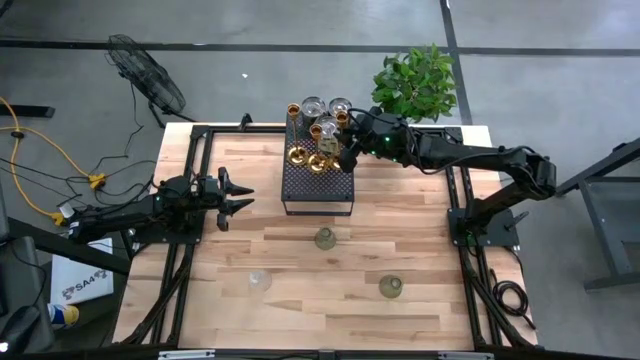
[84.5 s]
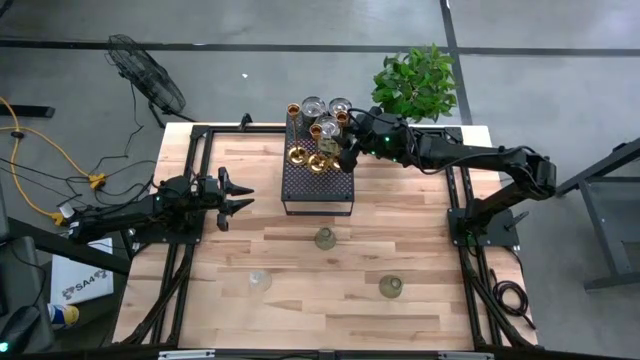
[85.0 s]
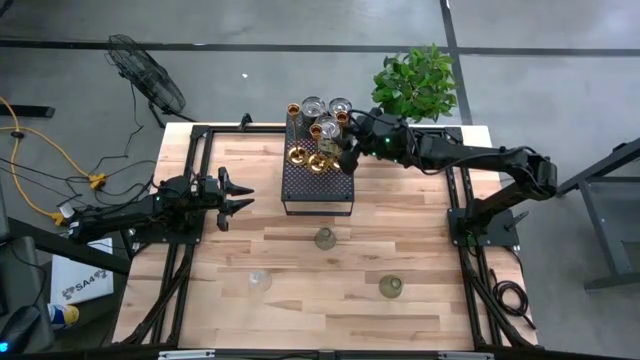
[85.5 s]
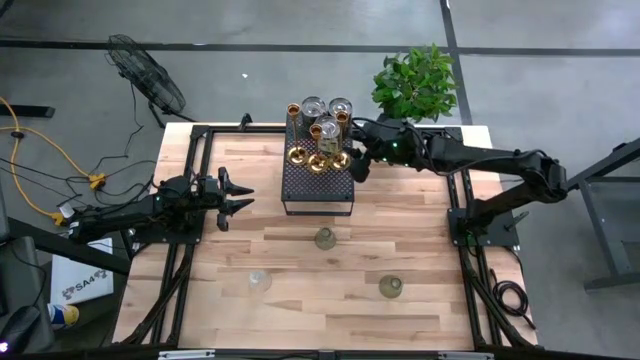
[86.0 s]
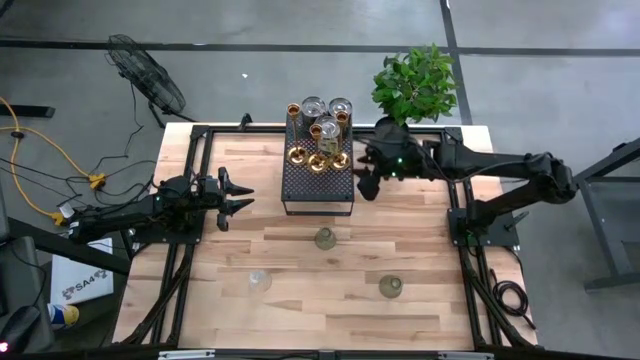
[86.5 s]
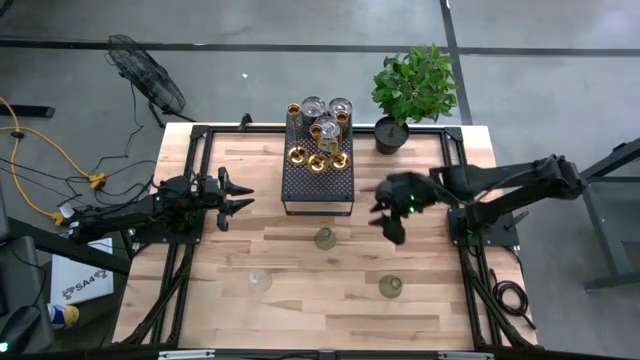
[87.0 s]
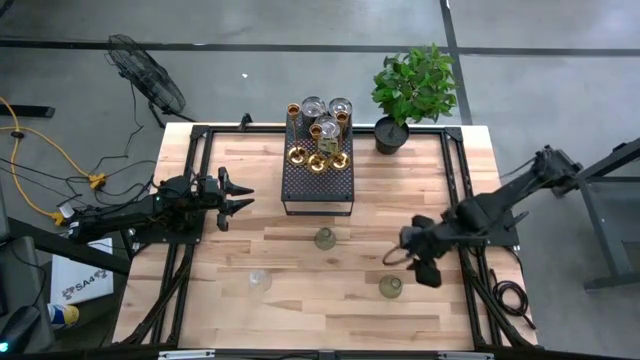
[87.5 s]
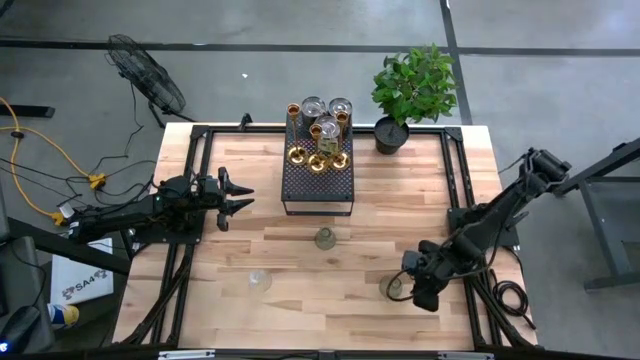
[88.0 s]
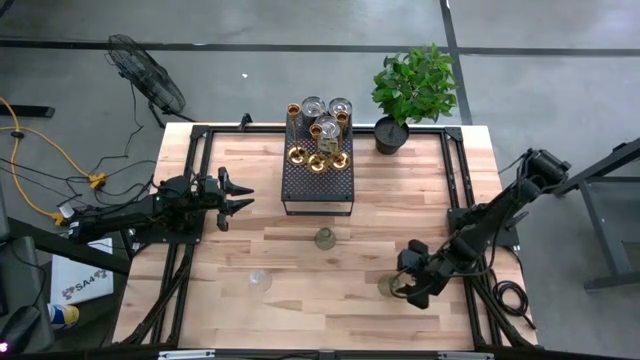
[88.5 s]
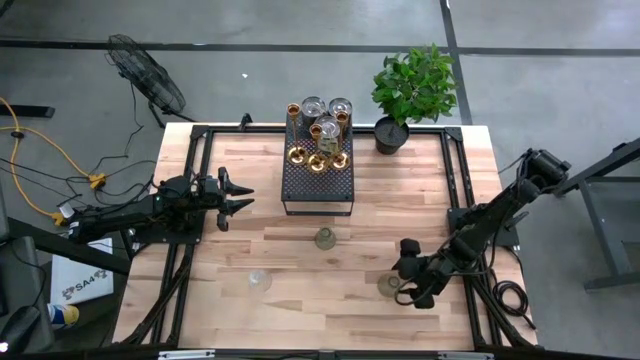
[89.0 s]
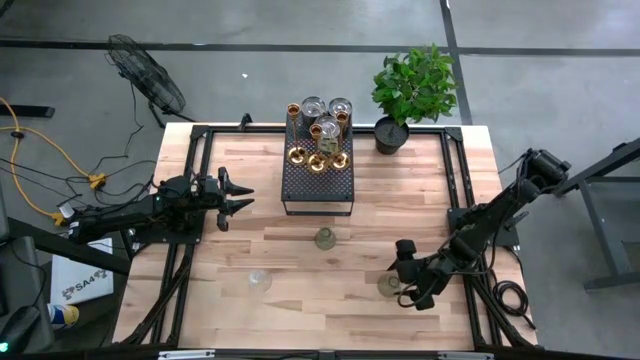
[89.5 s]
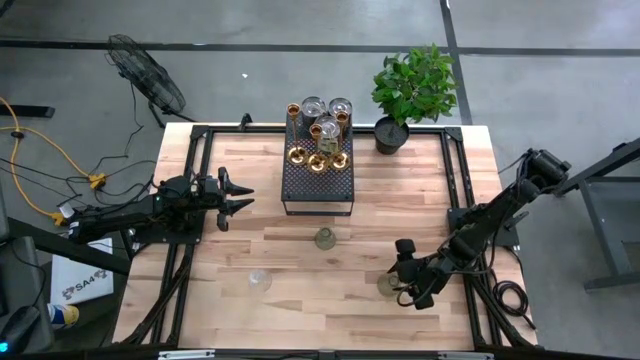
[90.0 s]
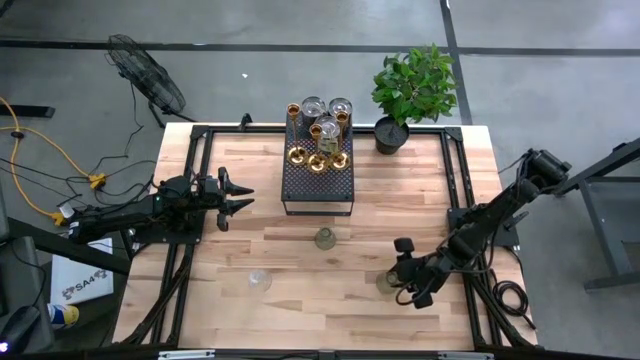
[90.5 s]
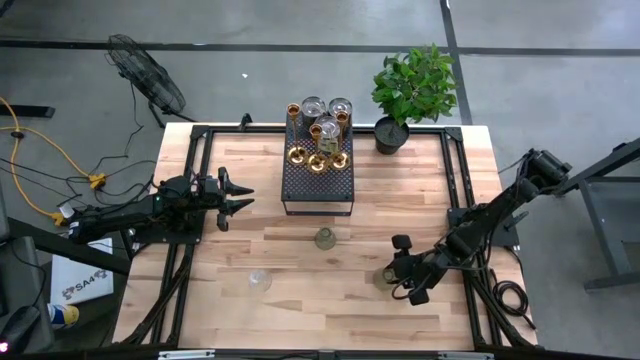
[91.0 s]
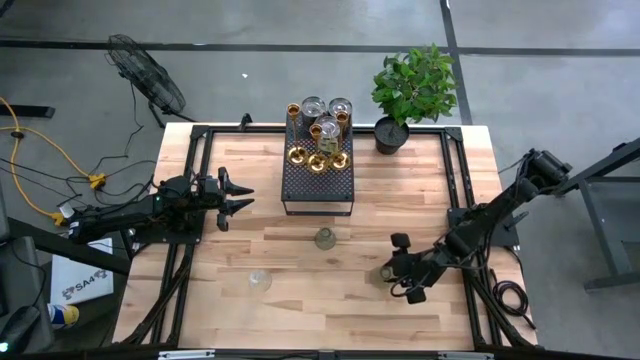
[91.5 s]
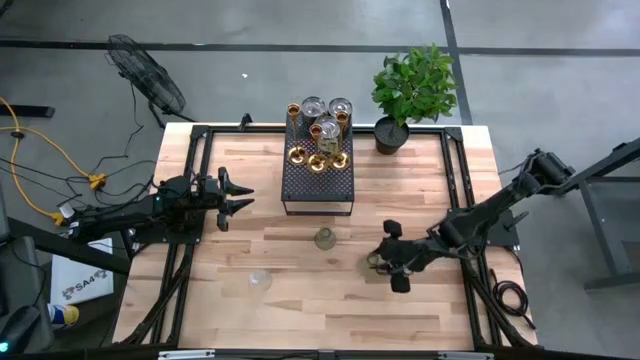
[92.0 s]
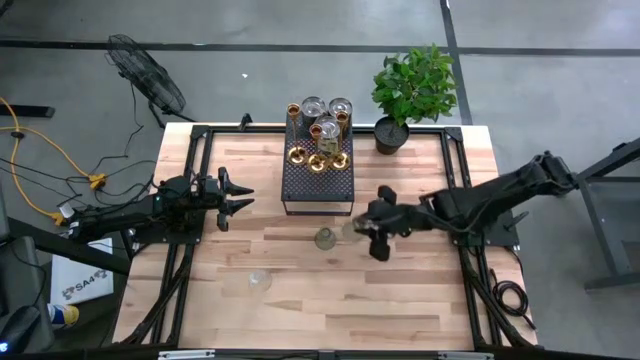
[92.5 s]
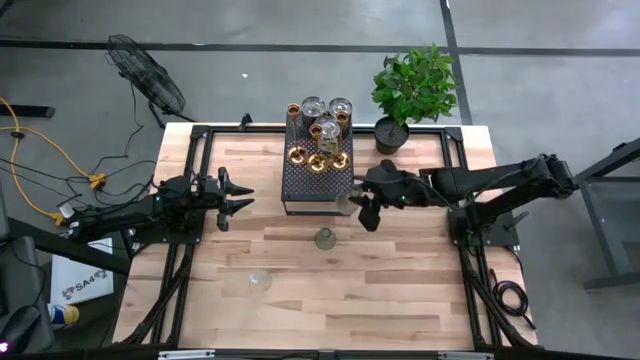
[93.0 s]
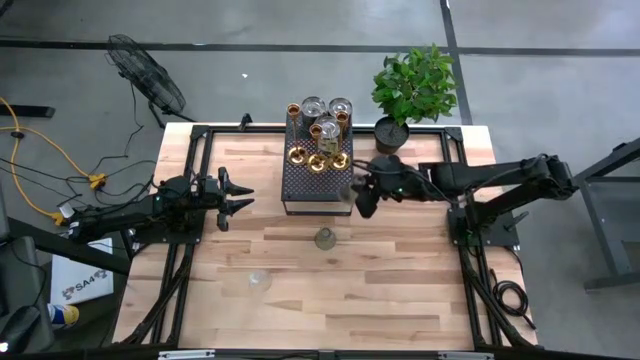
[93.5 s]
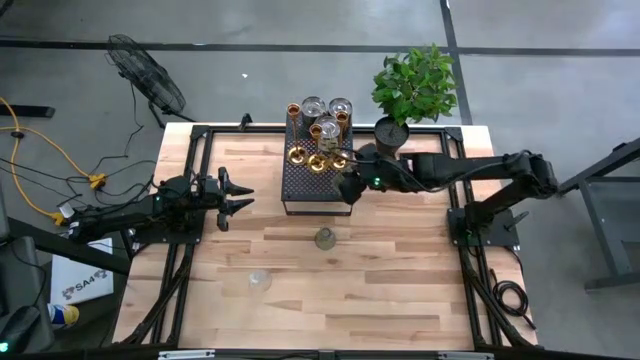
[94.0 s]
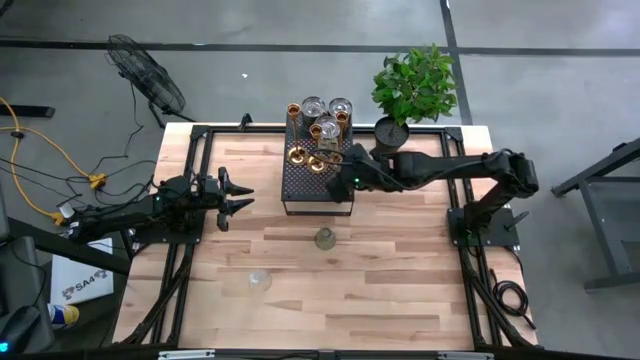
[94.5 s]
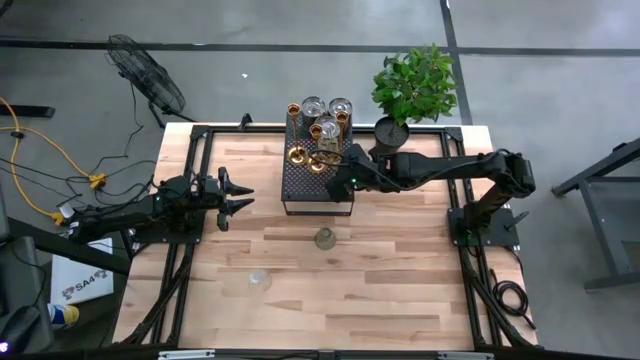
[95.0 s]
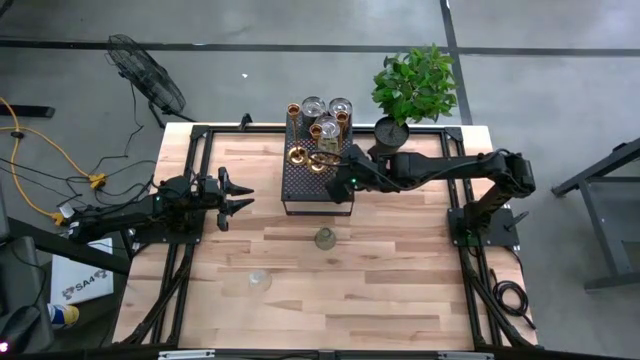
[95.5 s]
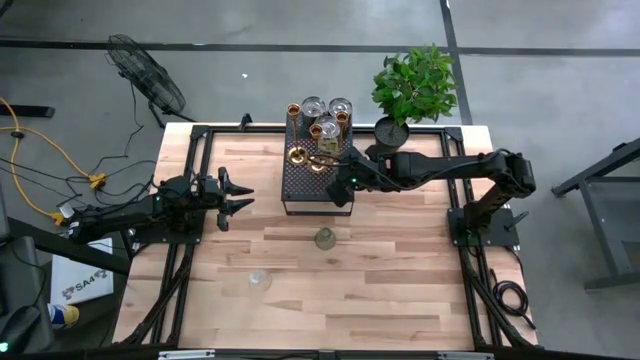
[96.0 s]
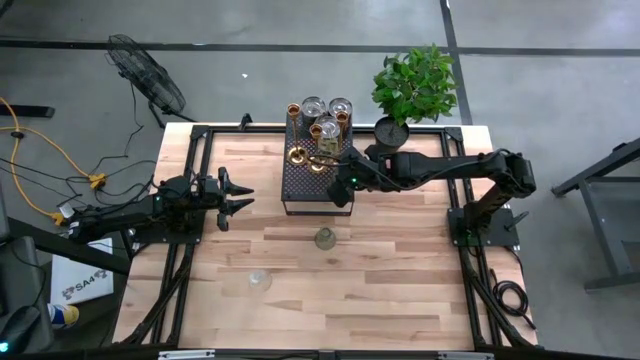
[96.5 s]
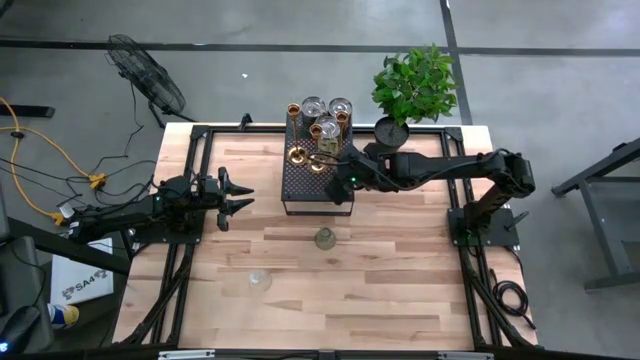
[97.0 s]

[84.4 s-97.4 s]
Task: Pick & Place candle stick holders
Put the bottom-right green transparent candle holder on the shelf

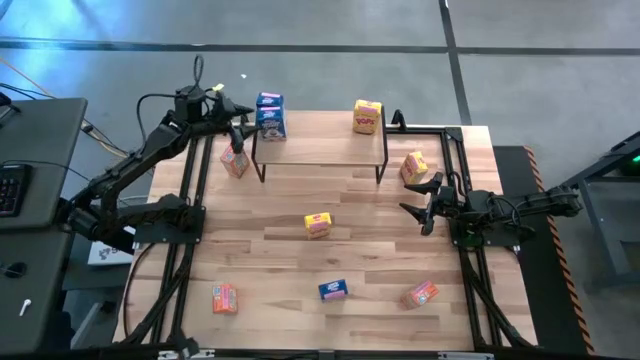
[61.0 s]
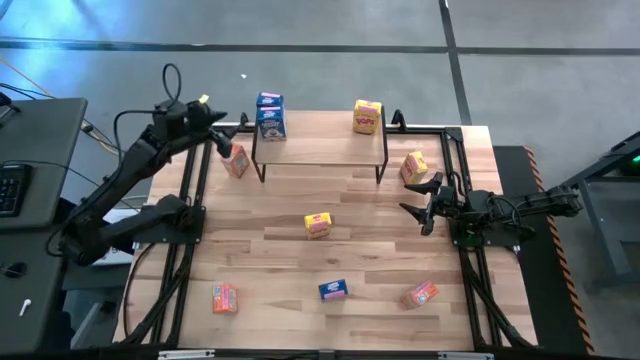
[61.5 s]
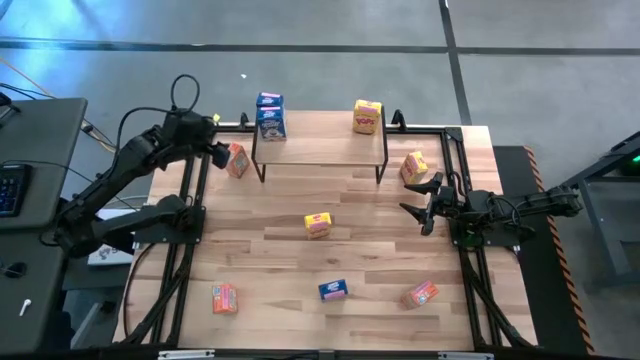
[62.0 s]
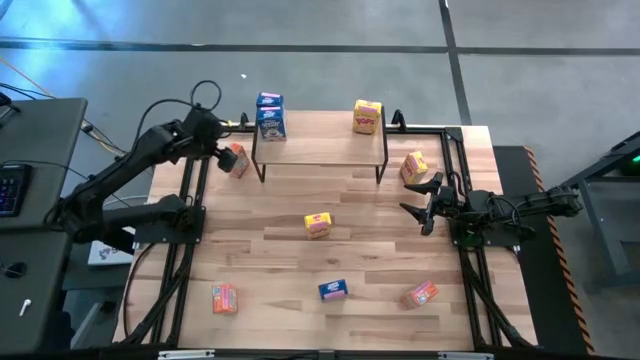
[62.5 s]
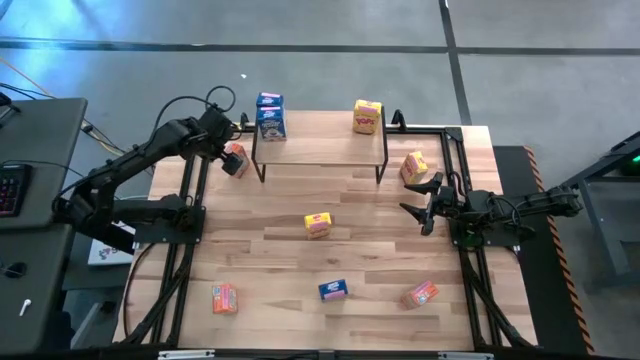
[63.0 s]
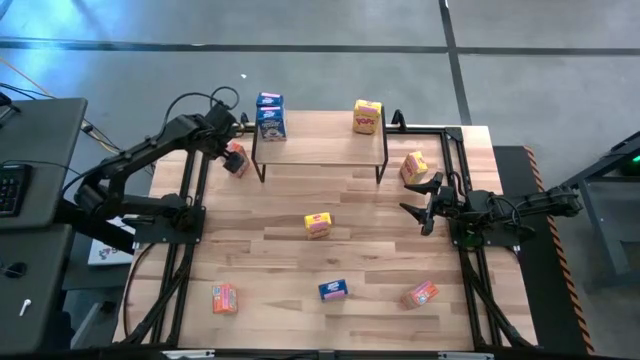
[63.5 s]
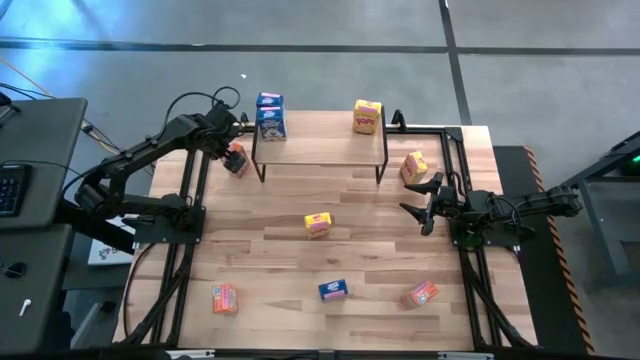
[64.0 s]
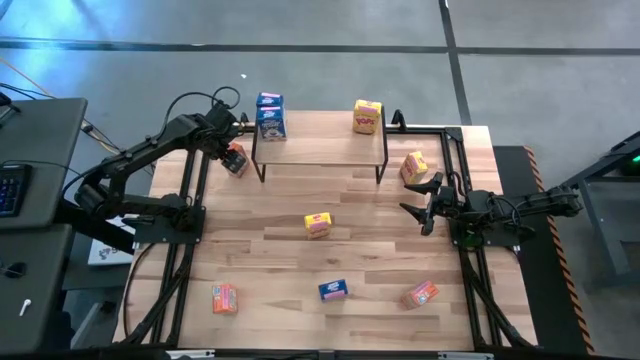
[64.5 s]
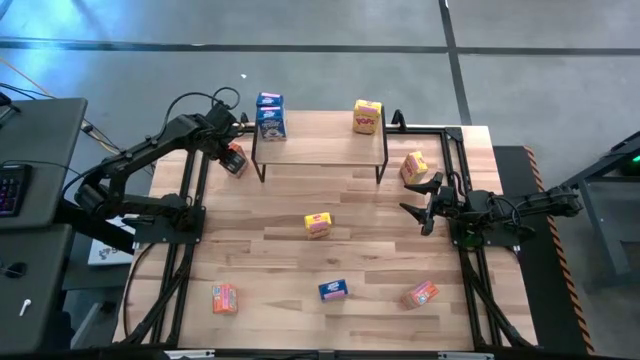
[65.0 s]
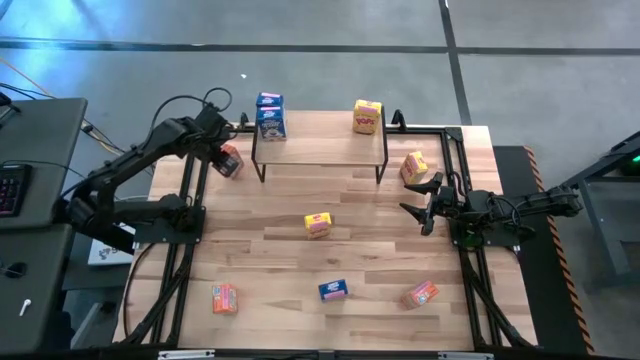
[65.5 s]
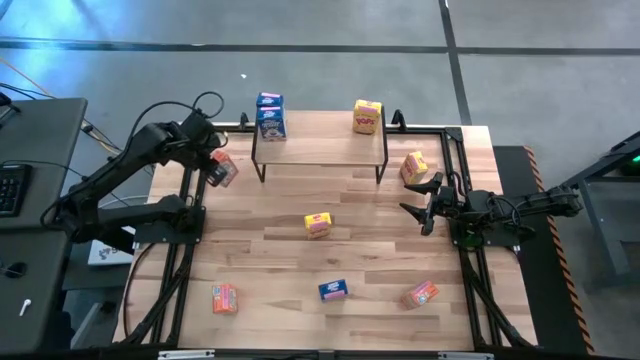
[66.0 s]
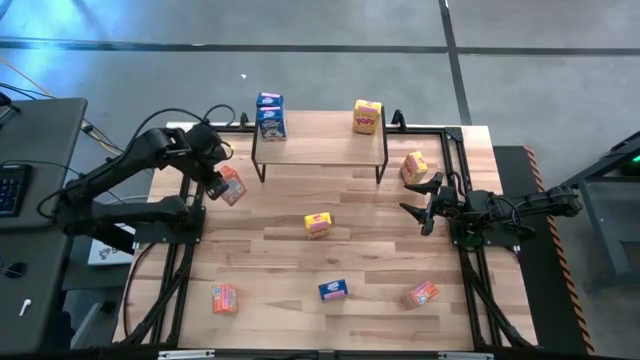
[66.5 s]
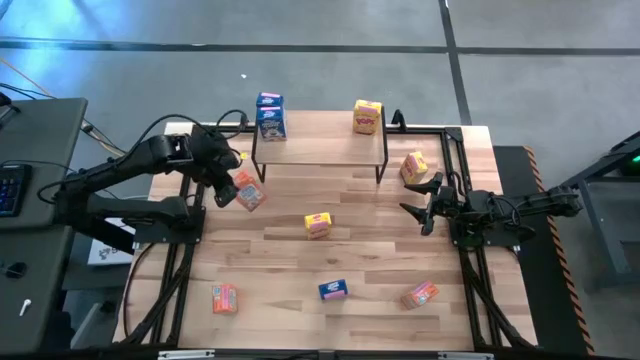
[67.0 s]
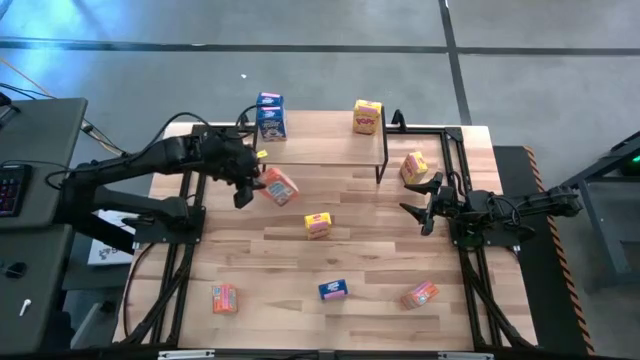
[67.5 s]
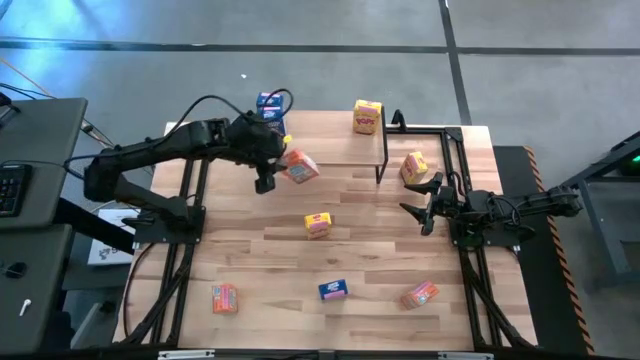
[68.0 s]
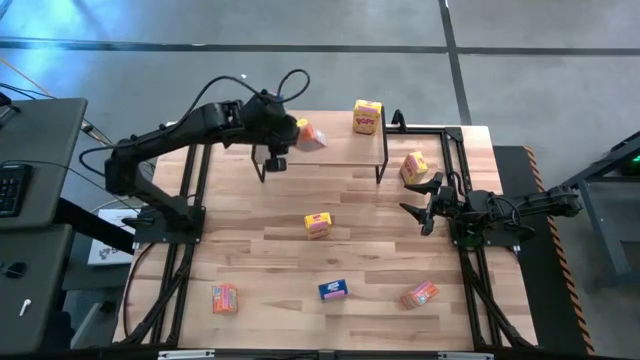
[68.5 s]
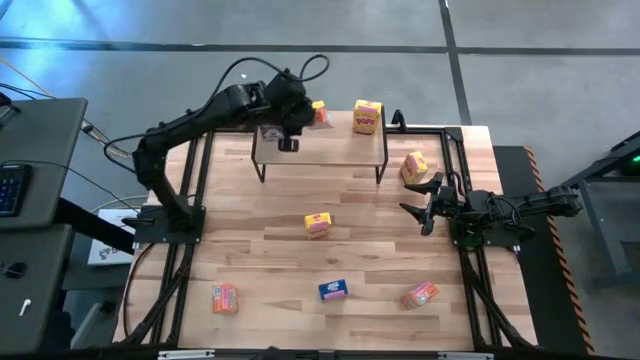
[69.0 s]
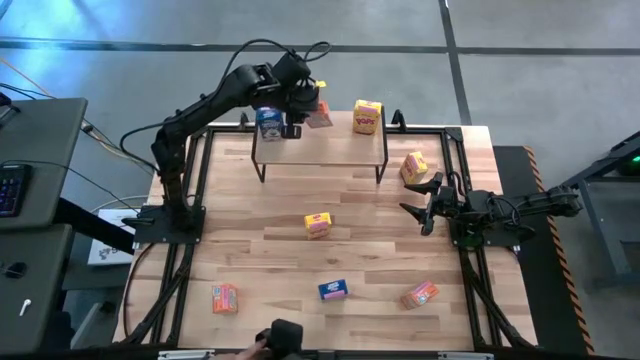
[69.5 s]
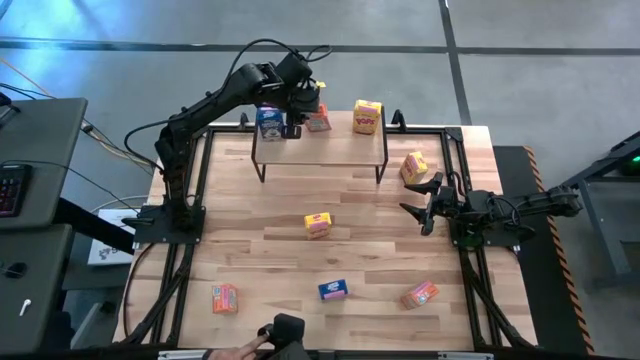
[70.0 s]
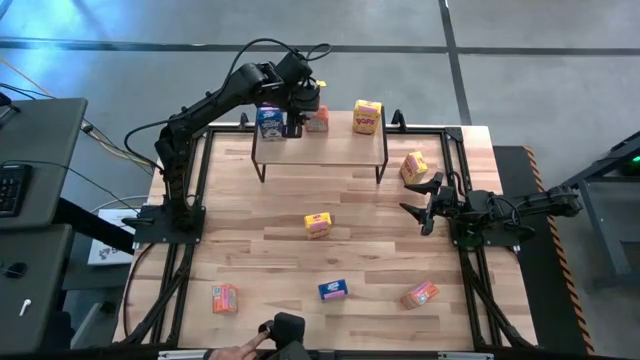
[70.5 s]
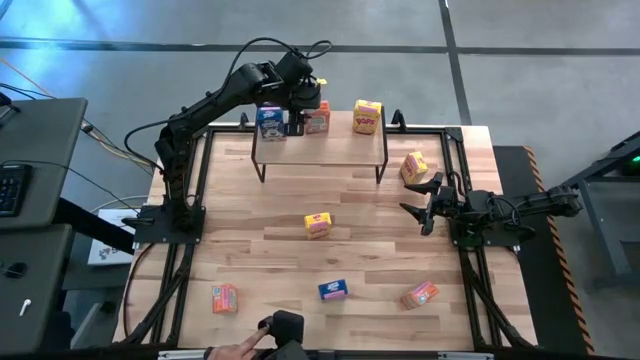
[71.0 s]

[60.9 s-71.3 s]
Task: Stack cereal on shelf
Put the top orange cereal box on the shelf
